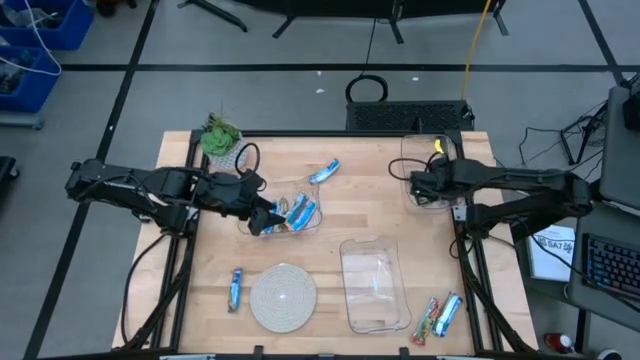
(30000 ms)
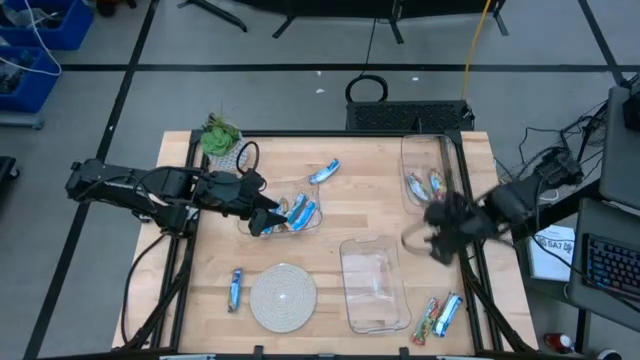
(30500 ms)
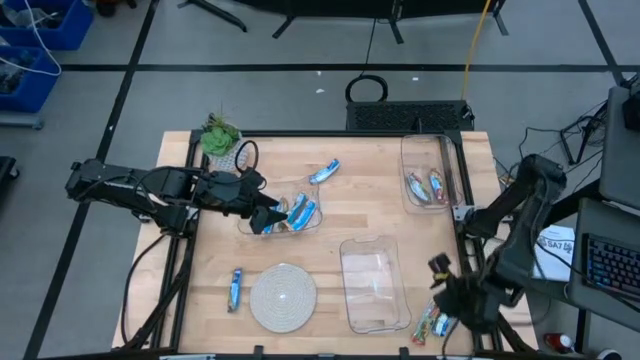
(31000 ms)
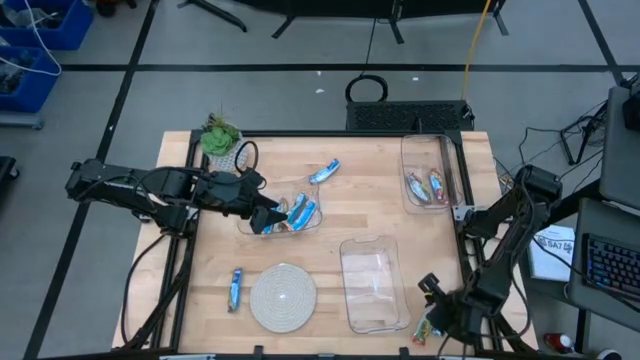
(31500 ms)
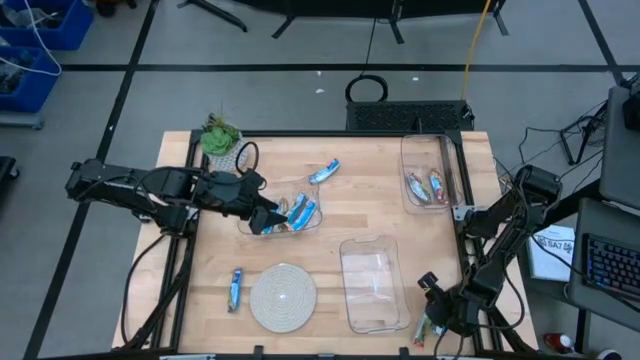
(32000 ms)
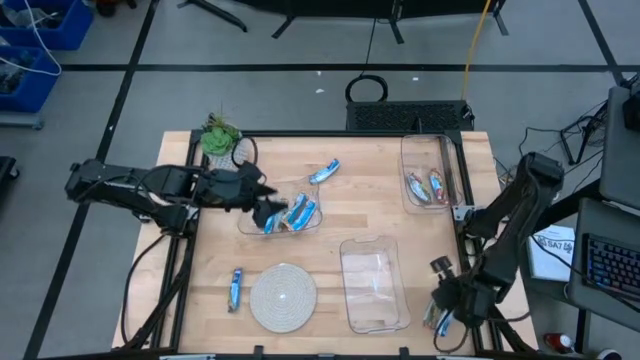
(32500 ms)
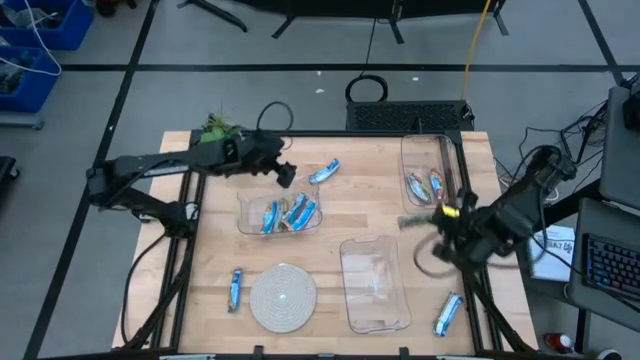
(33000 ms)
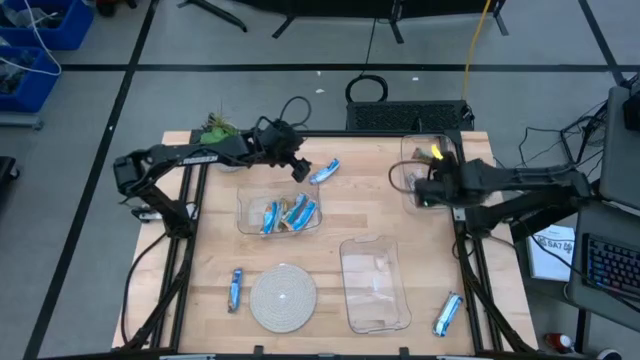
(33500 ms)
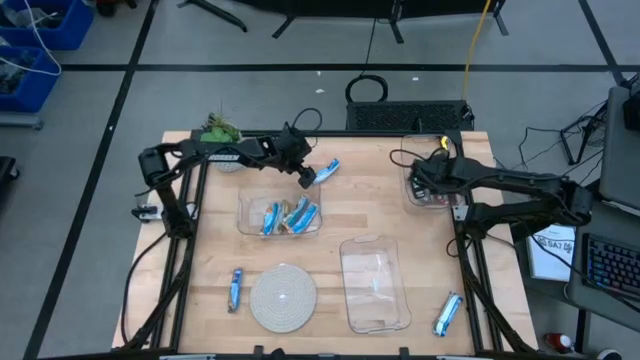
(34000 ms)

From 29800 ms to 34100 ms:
Task: Pick and place Granola Bars by type
Put the red granola bar into the top right transparent bin

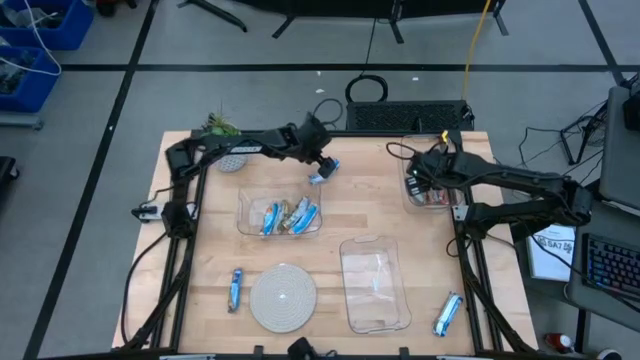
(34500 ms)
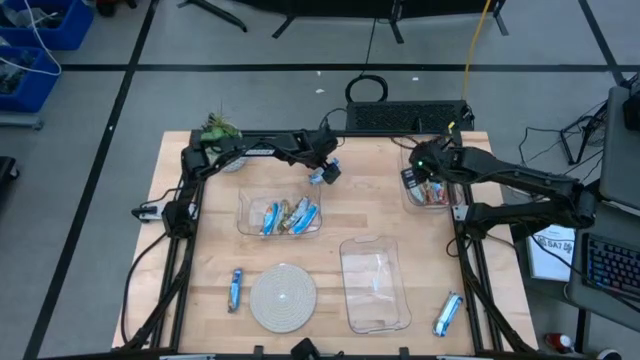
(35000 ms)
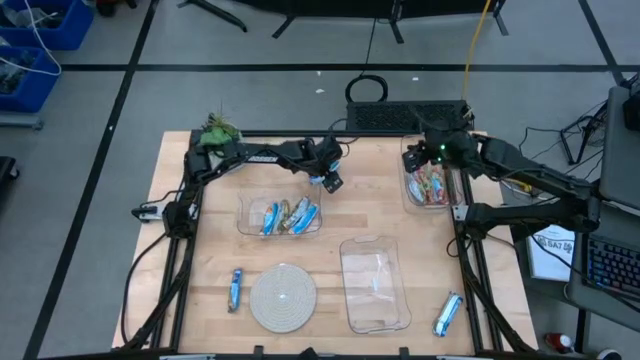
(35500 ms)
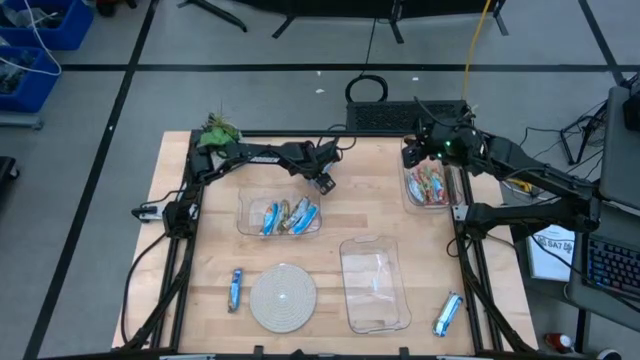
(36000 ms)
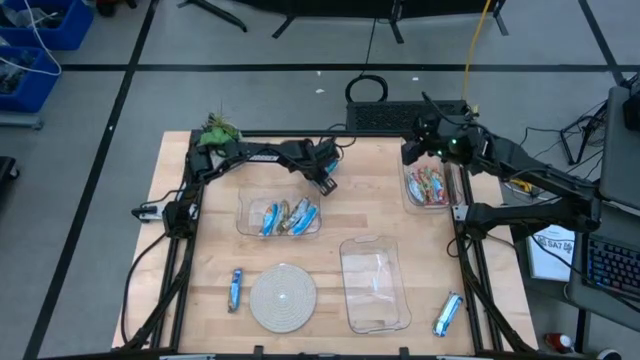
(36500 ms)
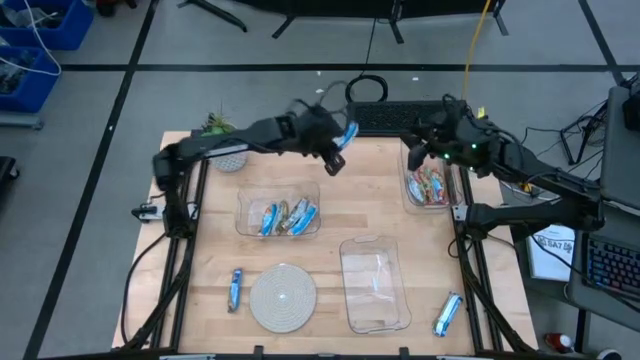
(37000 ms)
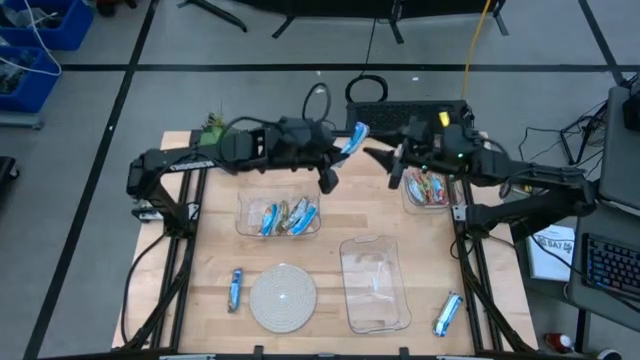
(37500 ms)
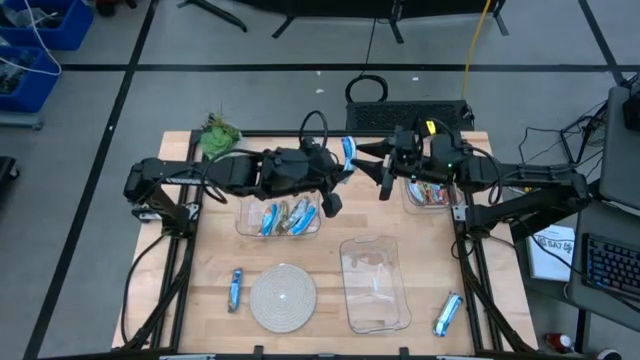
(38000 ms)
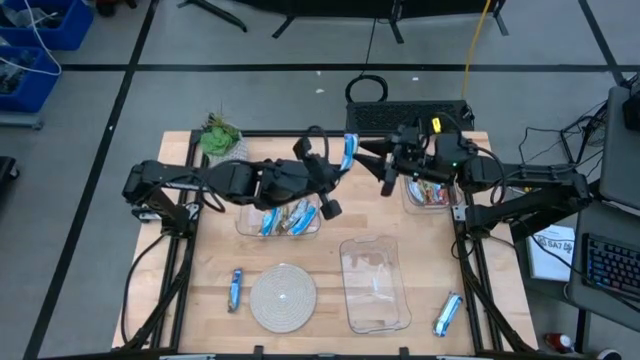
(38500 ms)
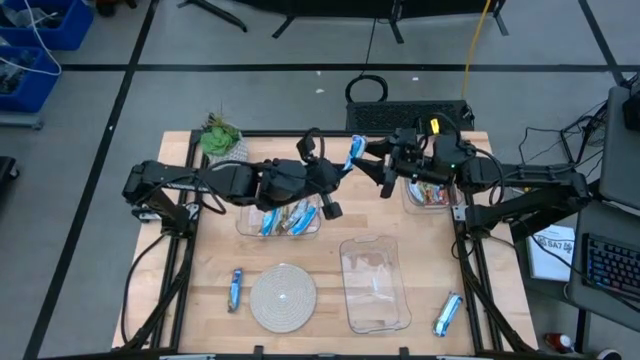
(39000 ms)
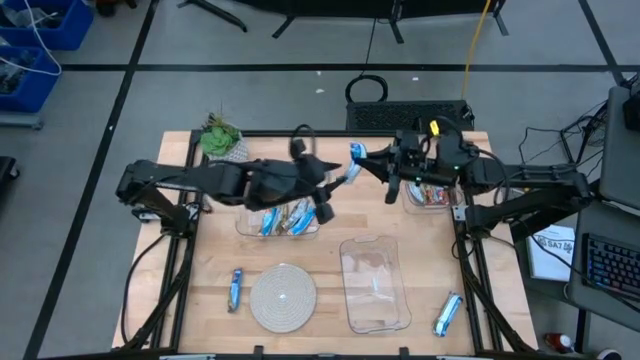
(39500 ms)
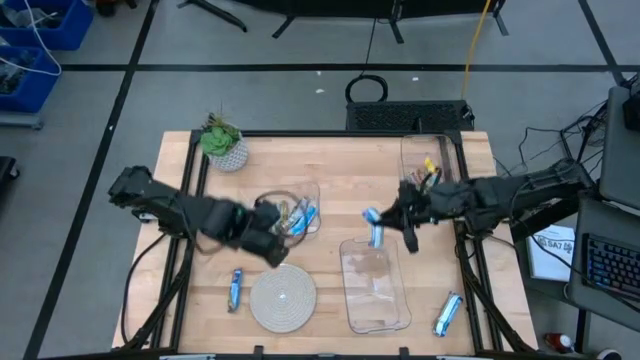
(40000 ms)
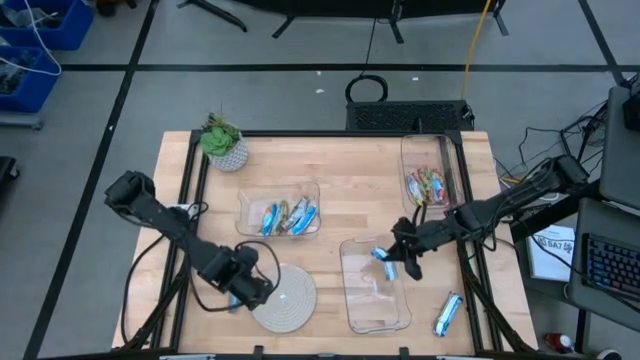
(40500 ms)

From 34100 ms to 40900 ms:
Put the top blue granola bar into the bottom transparent bin

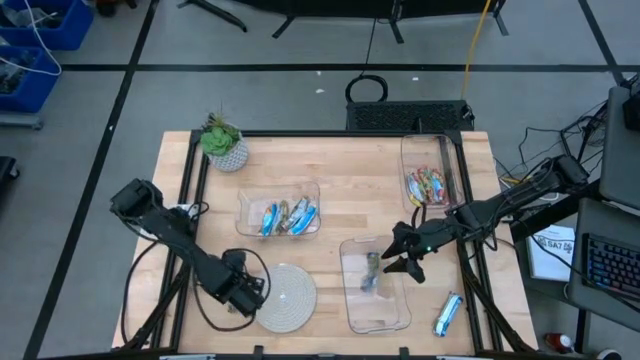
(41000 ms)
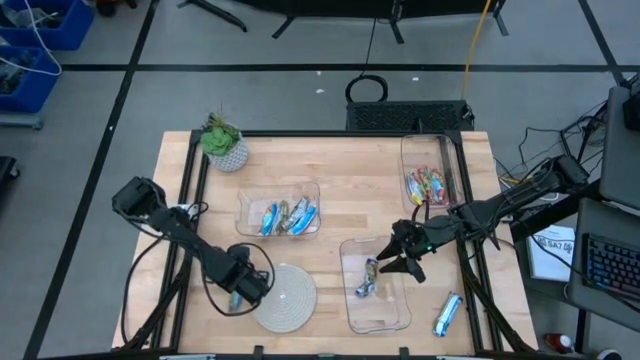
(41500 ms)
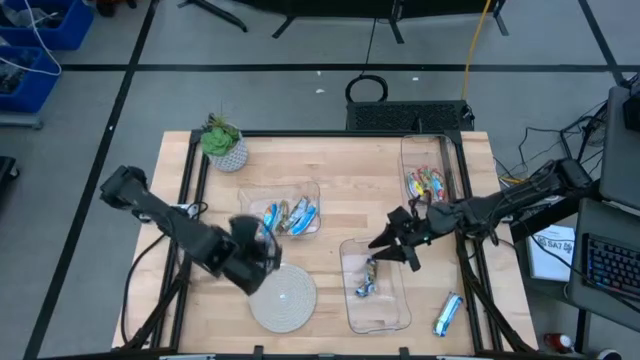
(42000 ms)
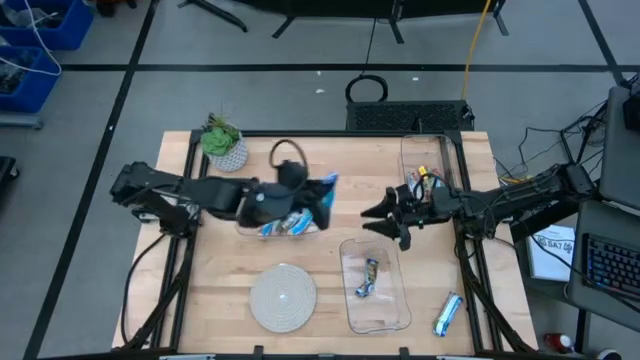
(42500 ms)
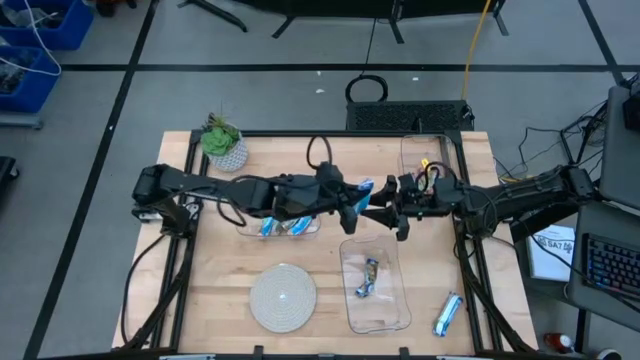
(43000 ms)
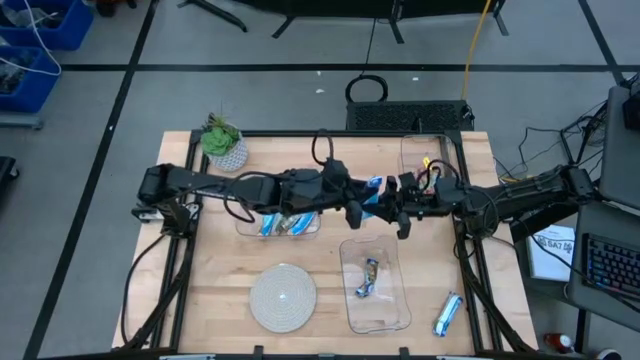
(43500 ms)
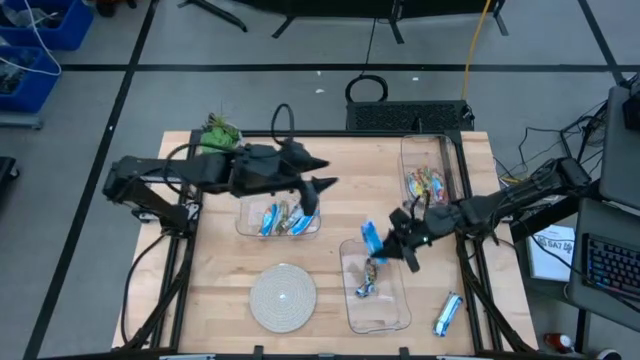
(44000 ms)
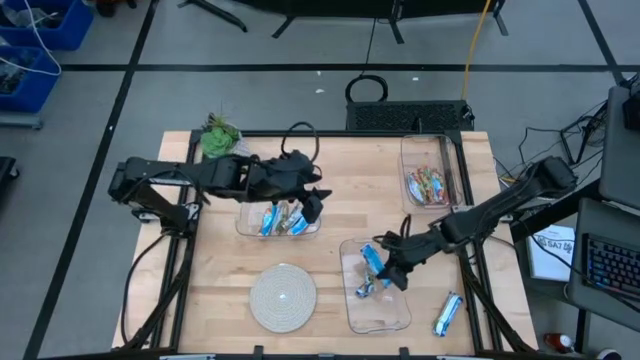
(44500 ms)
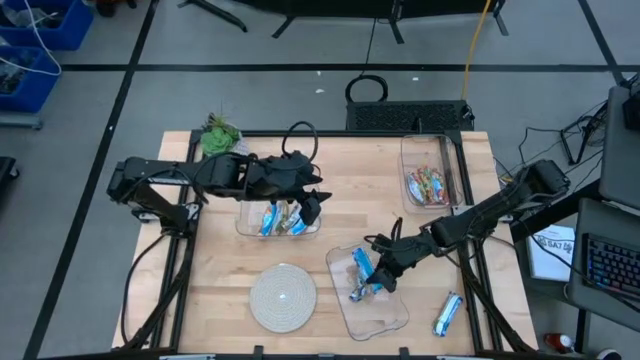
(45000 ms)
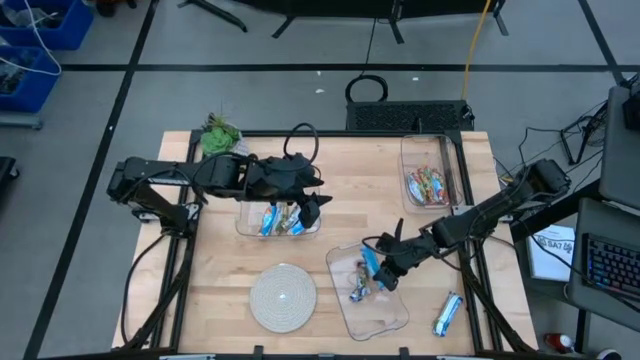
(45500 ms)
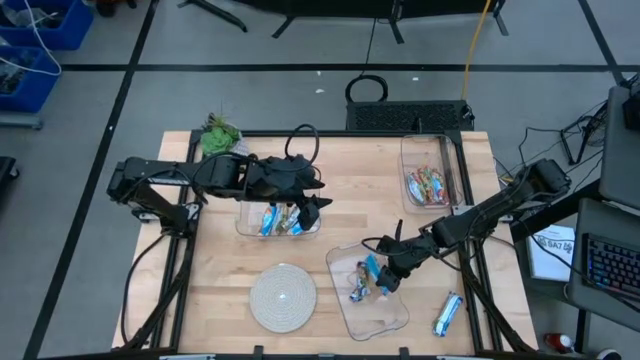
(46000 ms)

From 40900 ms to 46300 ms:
Put the left blue granola bar into the bottom transparent bin

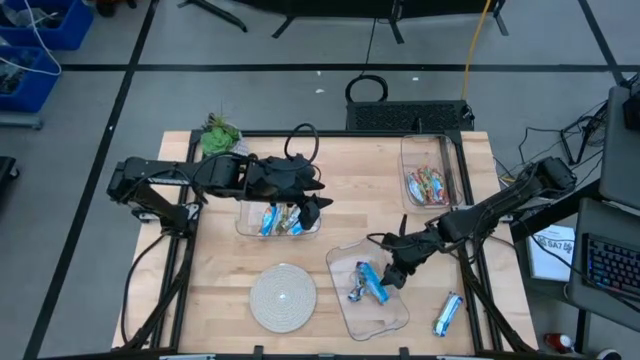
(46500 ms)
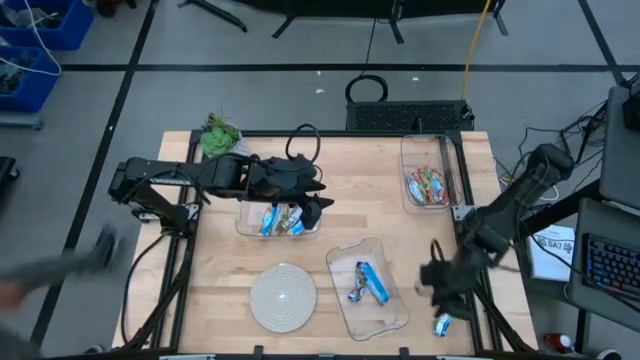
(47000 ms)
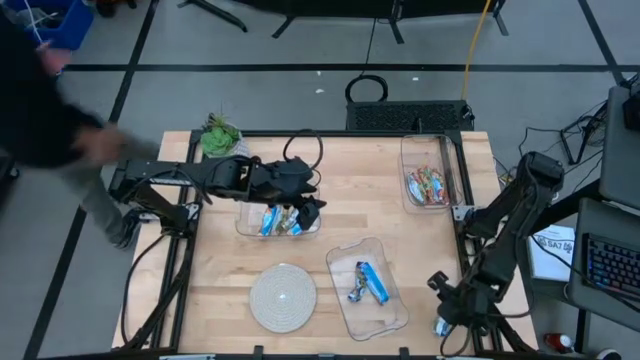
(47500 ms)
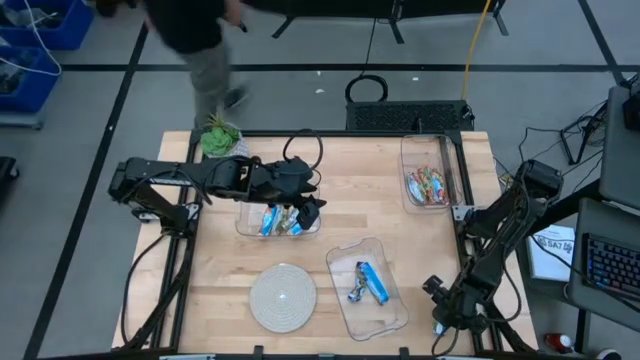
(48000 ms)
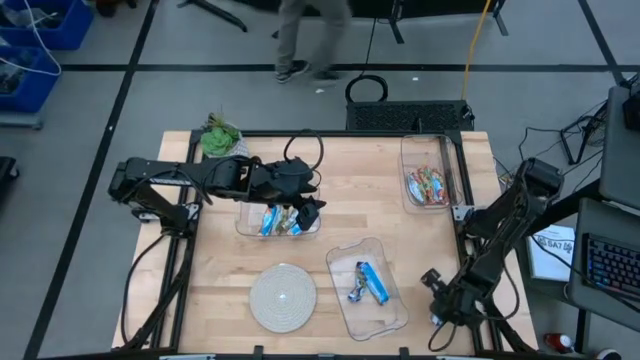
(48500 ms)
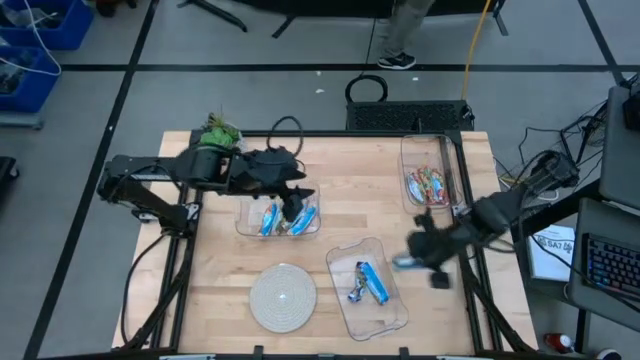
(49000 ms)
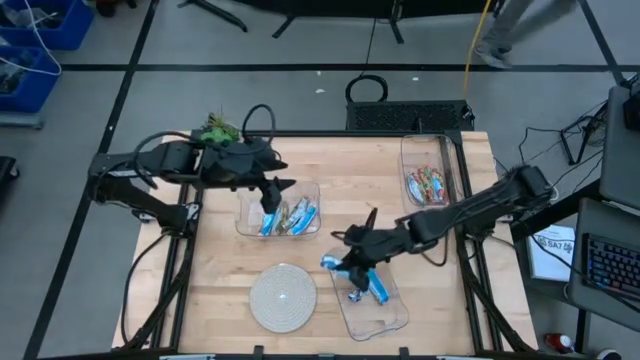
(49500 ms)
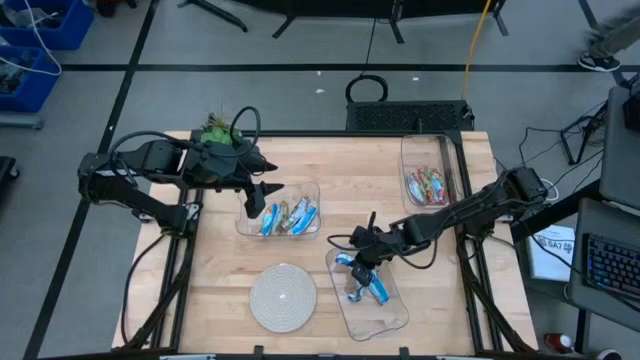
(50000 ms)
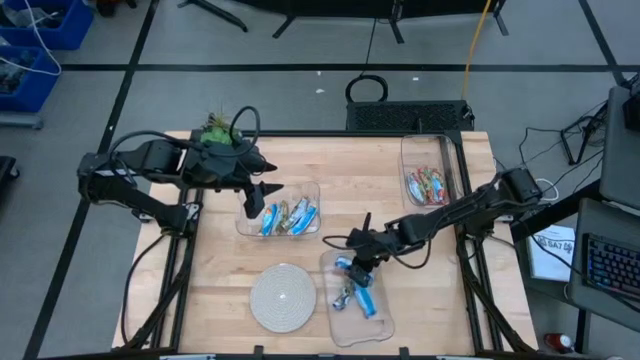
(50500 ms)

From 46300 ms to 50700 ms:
Put the blue granola bar into the bottom transparent bin

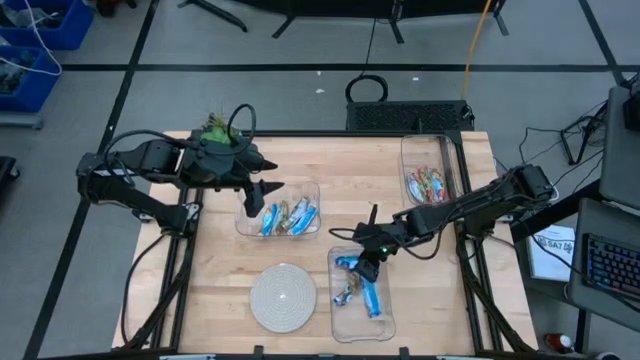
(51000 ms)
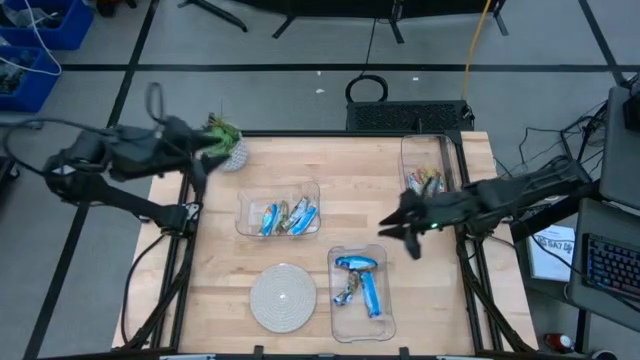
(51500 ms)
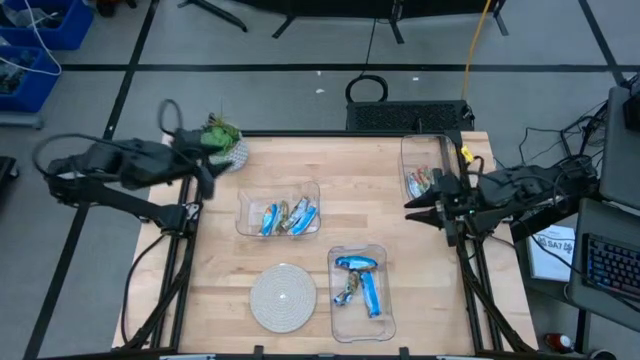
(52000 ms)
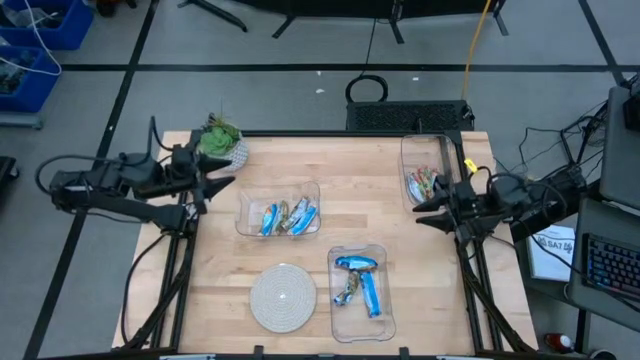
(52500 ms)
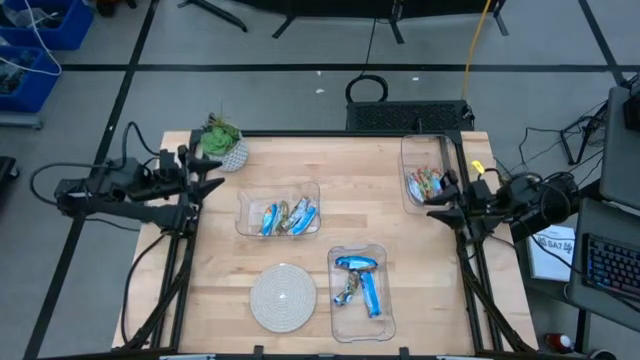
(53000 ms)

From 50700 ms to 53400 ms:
Return to Home Position
